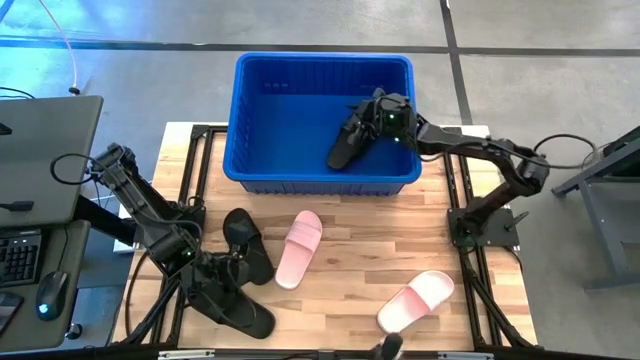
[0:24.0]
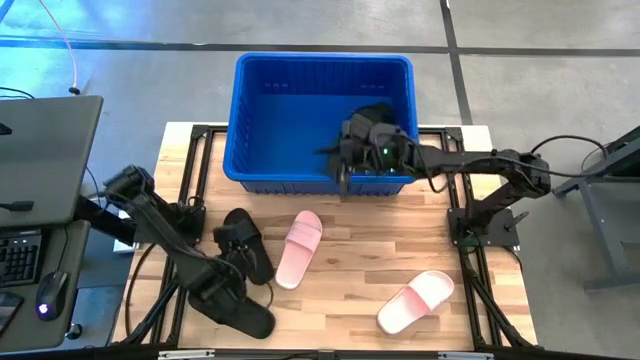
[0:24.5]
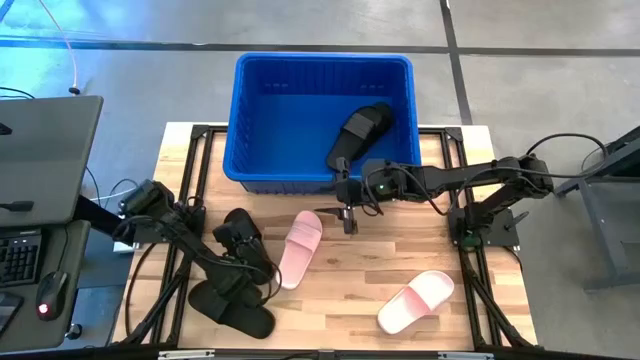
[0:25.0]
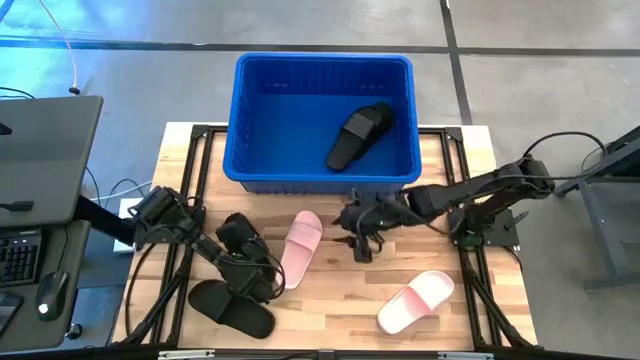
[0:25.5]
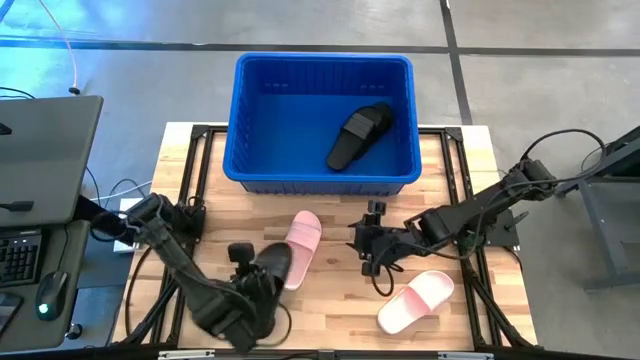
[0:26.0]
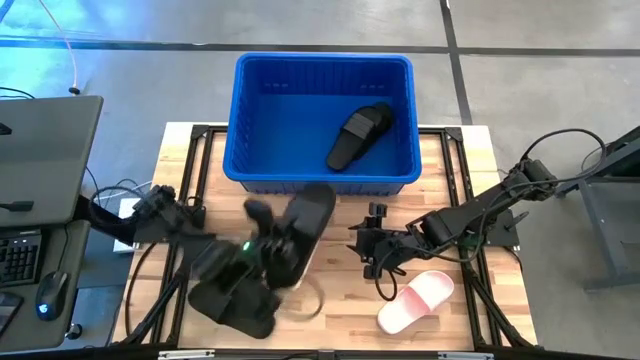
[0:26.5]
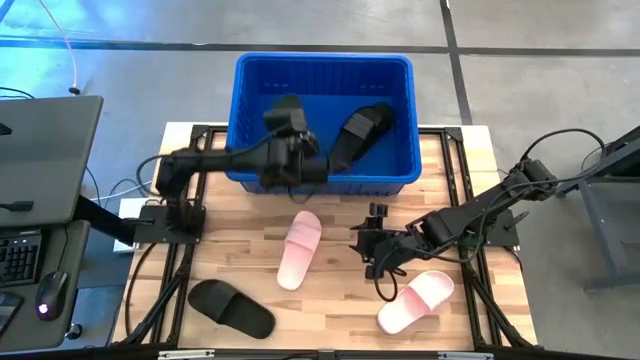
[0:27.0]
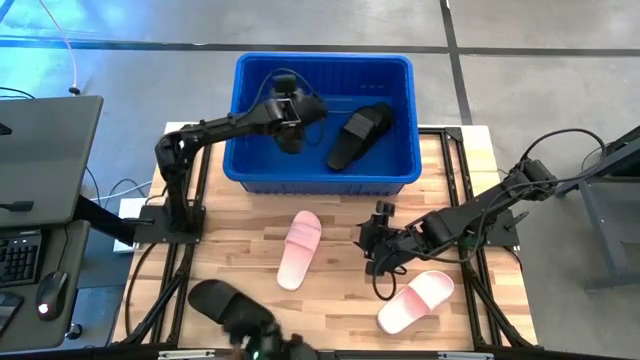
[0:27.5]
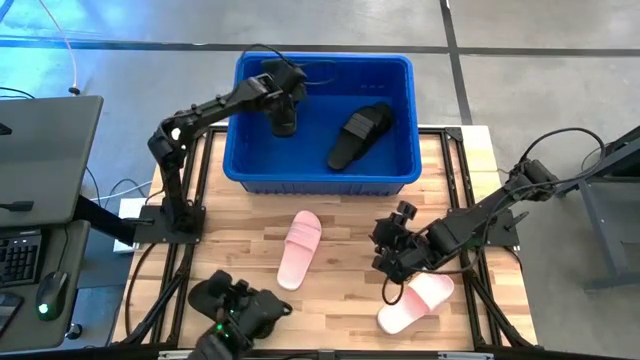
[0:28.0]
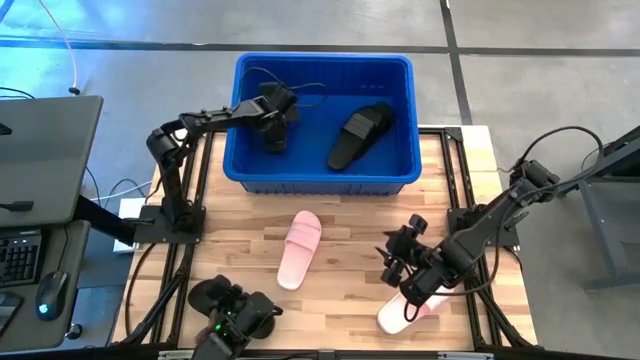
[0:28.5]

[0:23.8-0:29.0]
Task: Pick and place slides into bin
Put the black slide into the blue container

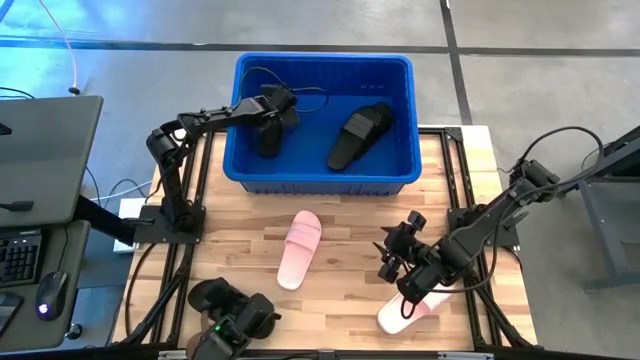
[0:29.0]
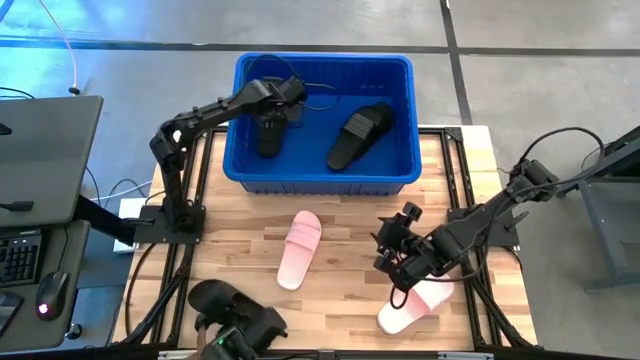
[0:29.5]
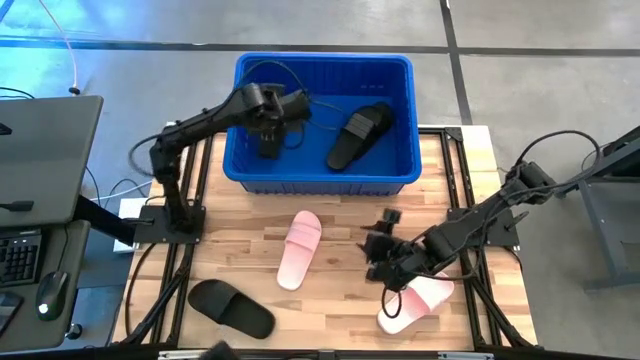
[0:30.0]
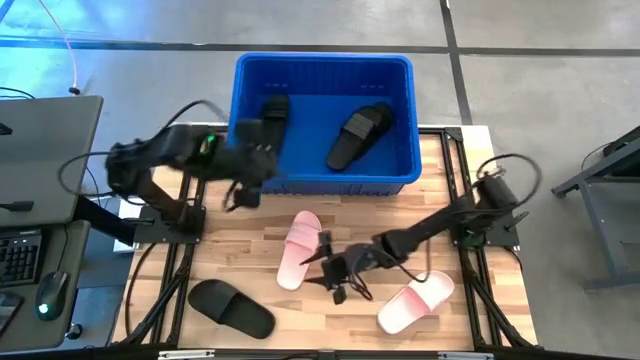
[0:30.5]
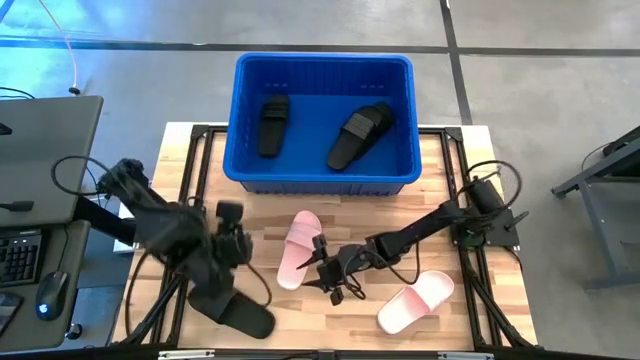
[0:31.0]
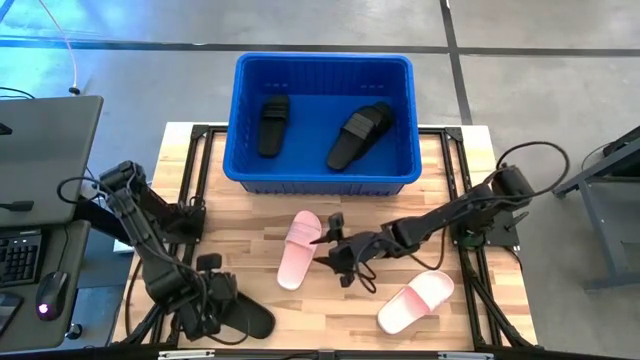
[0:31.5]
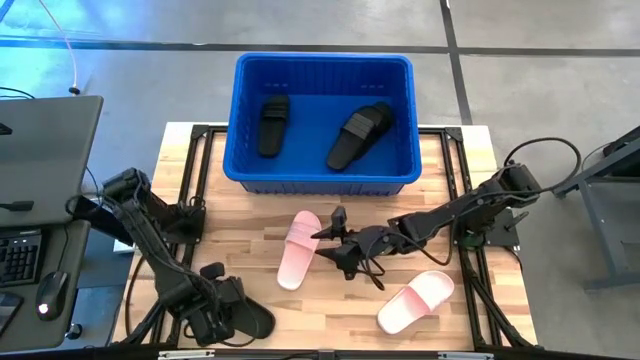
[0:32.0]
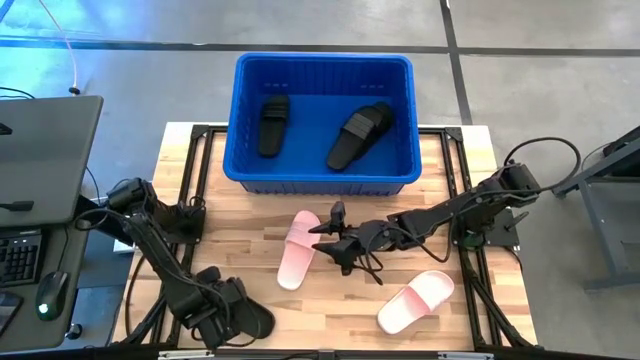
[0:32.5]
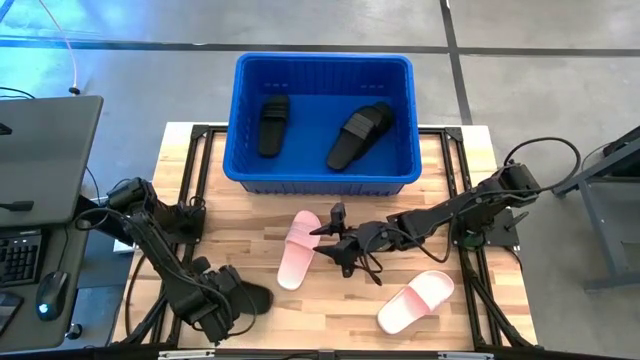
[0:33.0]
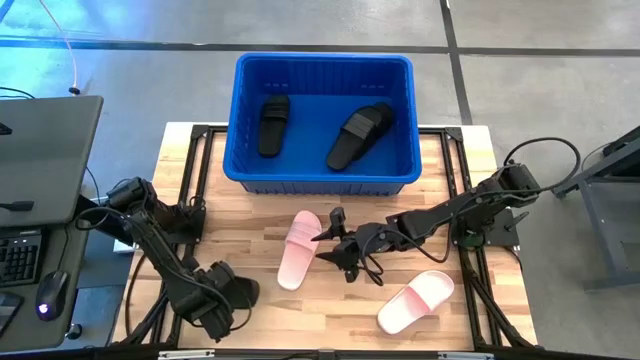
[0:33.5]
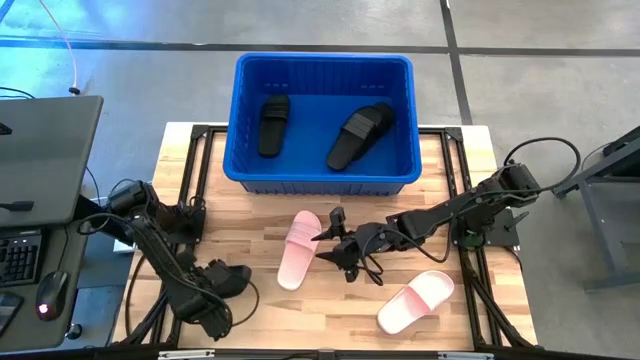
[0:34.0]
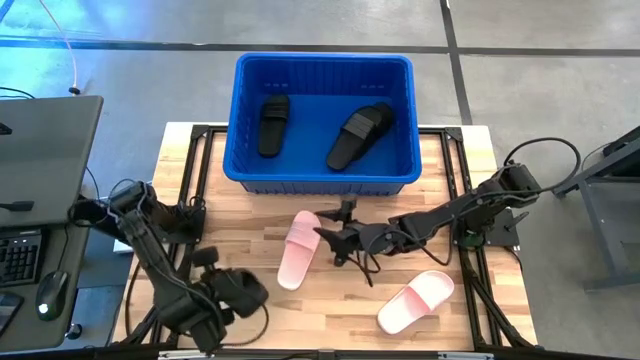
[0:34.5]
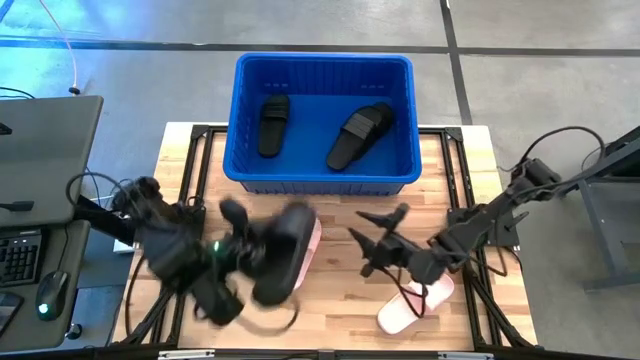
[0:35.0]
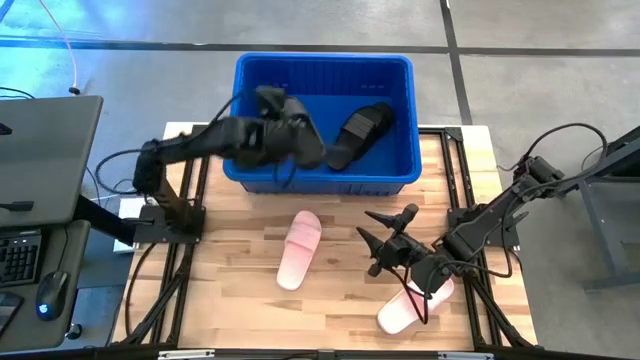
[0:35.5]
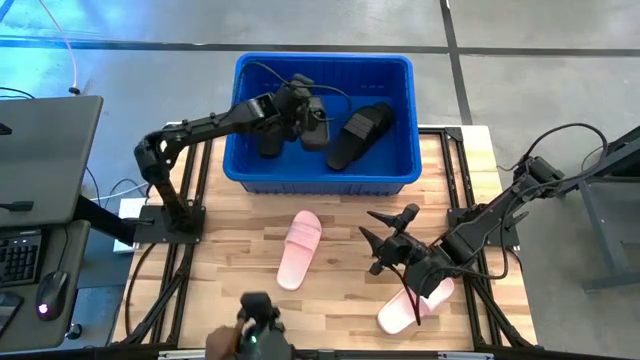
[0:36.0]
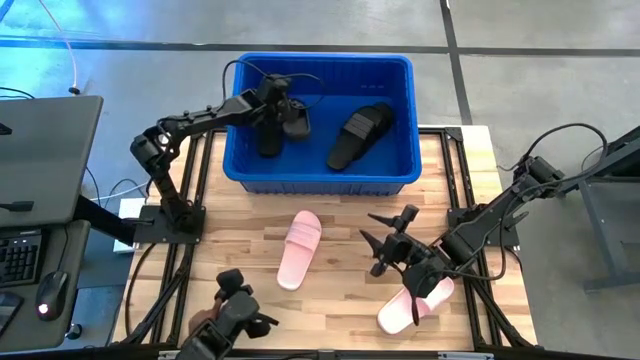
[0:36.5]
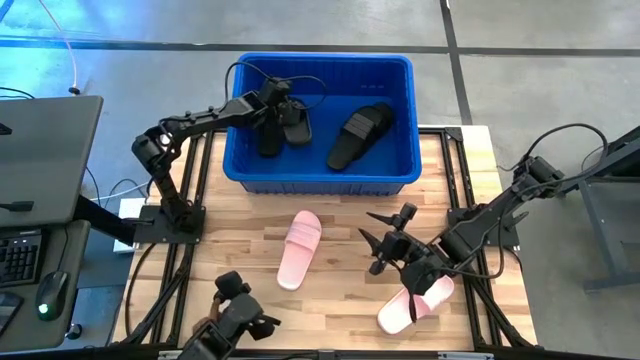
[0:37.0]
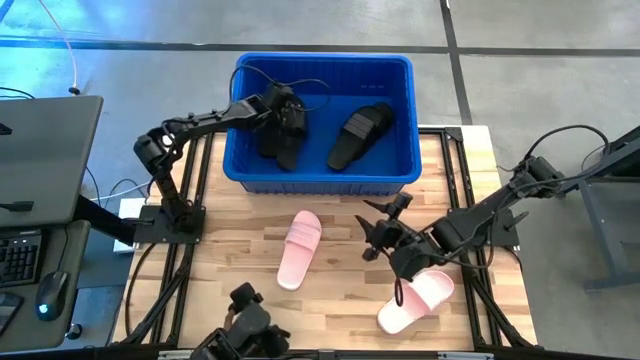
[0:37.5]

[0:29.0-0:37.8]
Put the black slide into the blue container

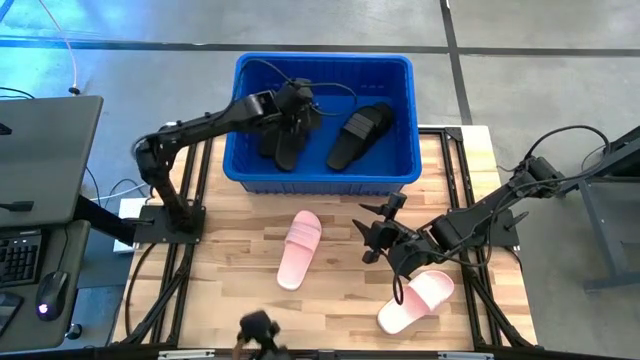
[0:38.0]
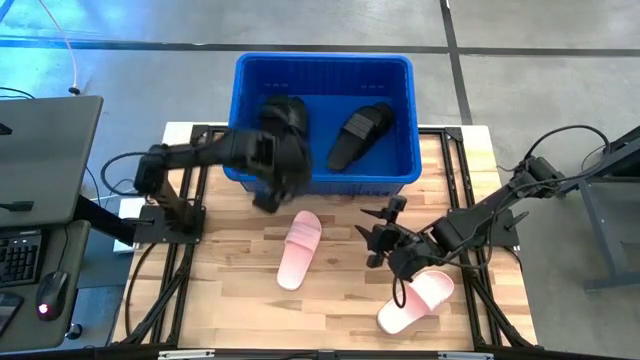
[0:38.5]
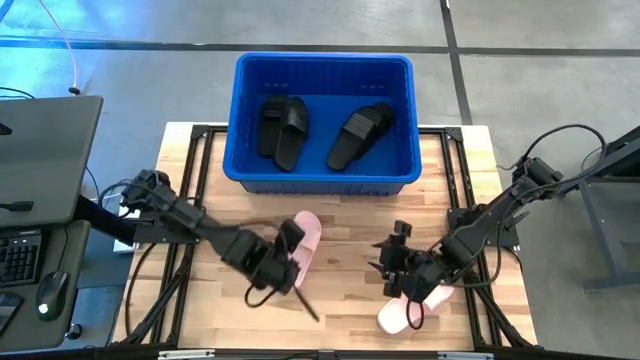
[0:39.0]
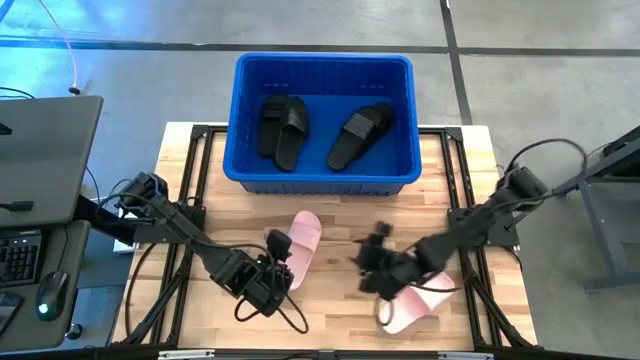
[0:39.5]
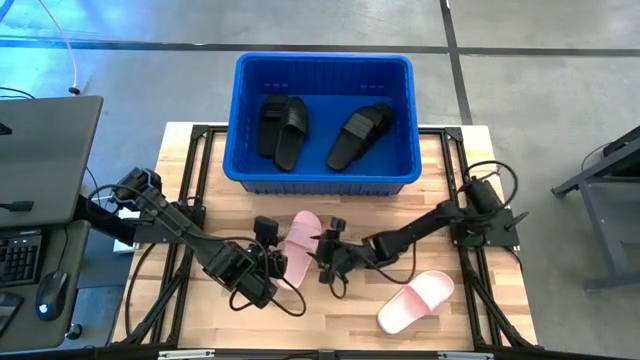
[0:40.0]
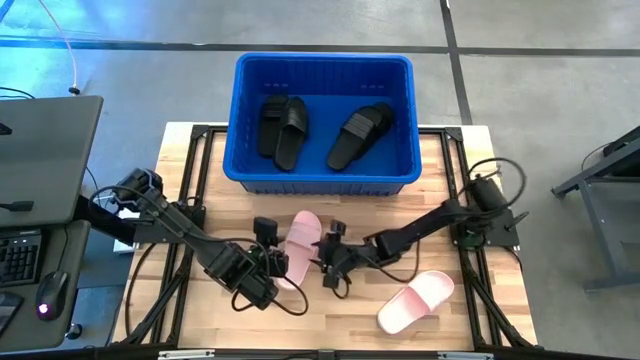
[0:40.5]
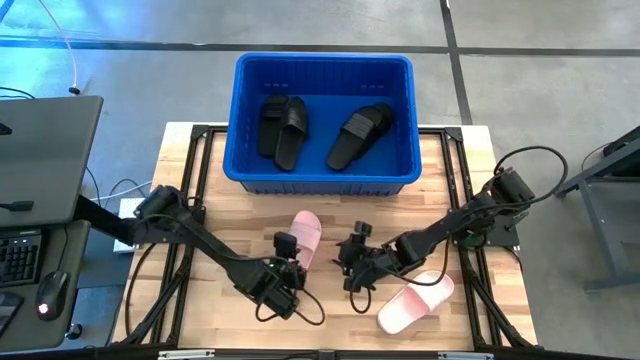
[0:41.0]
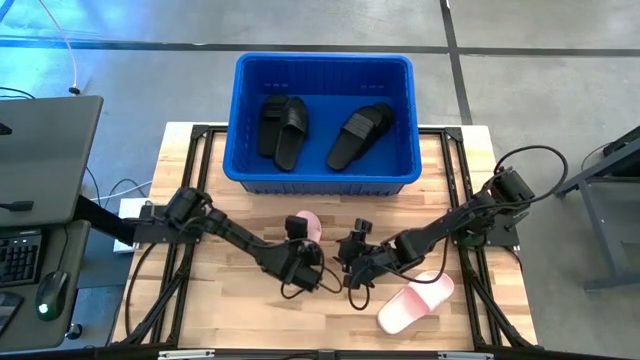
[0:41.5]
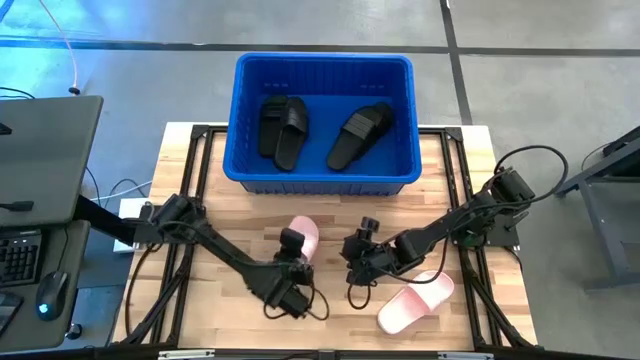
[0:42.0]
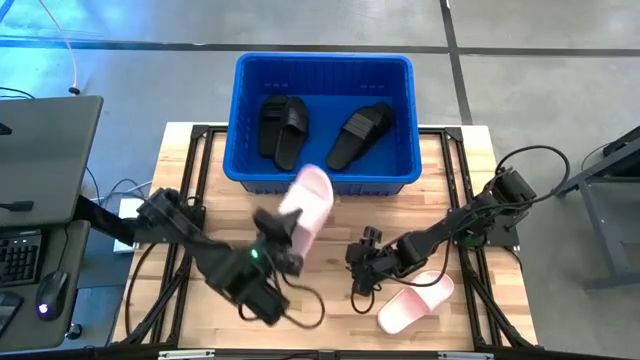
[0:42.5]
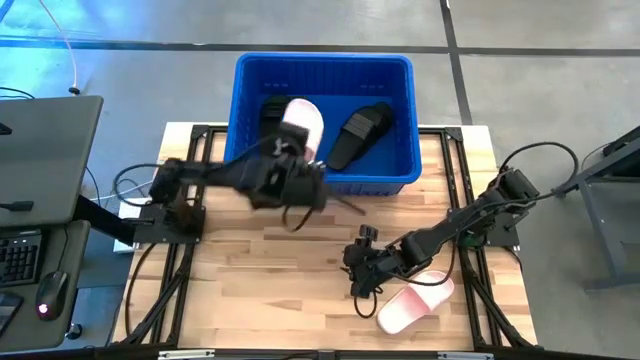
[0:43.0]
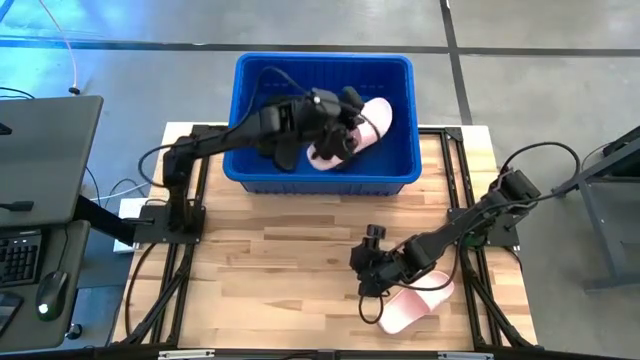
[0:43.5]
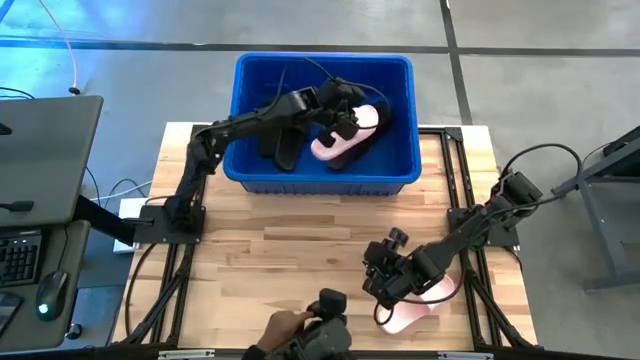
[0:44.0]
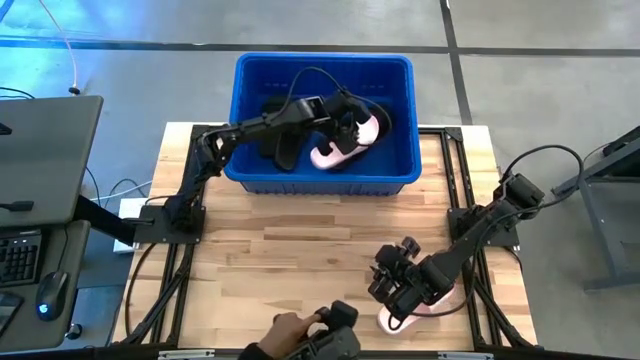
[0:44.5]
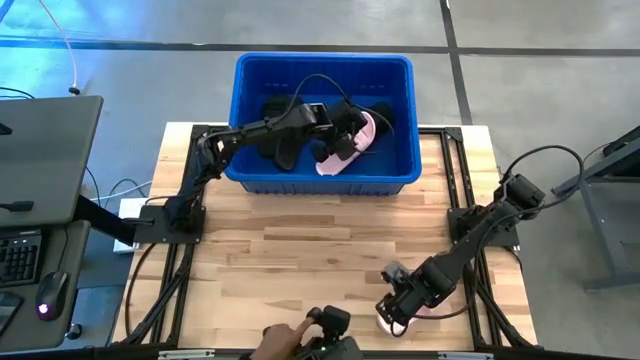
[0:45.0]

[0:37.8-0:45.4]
Put the left pink slide into the blue container
